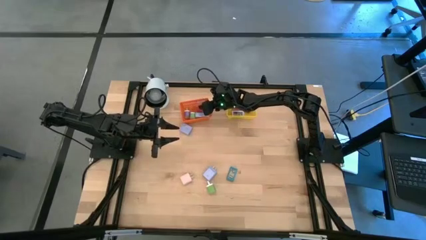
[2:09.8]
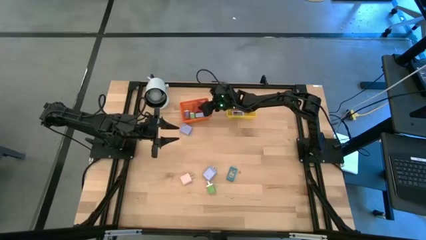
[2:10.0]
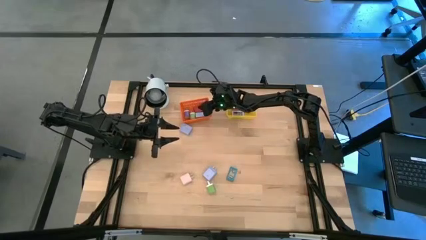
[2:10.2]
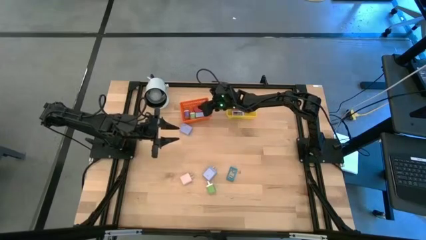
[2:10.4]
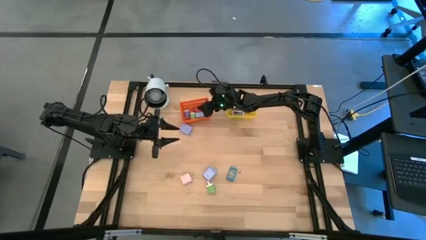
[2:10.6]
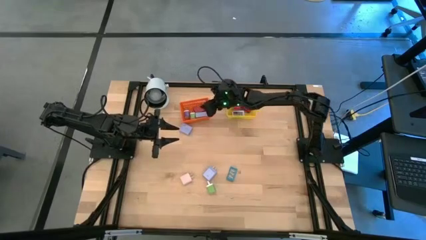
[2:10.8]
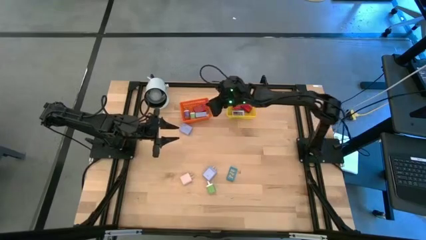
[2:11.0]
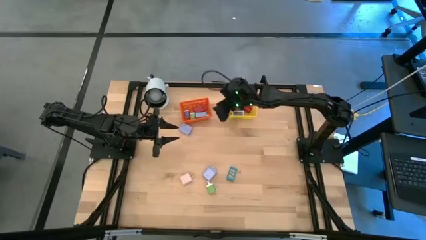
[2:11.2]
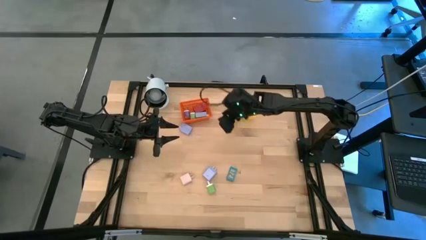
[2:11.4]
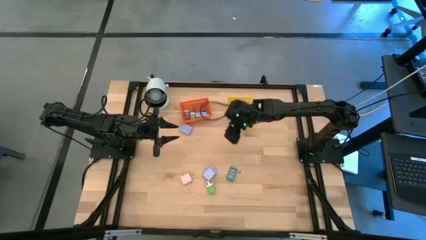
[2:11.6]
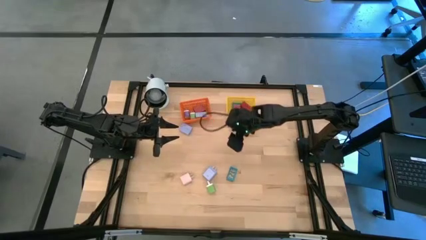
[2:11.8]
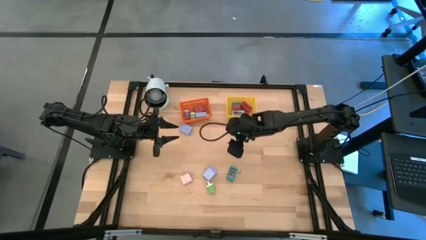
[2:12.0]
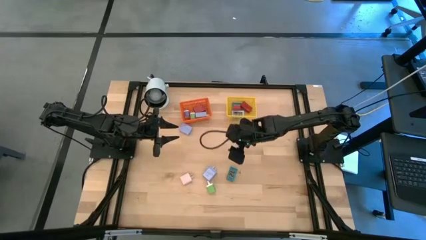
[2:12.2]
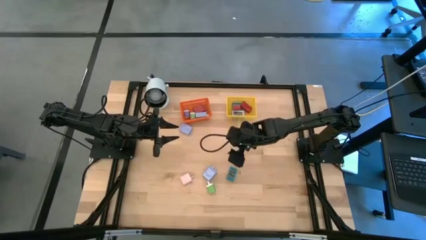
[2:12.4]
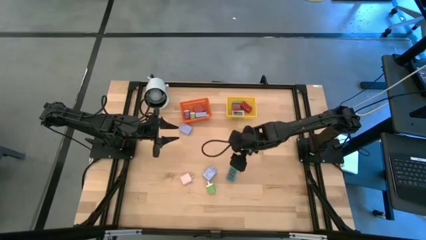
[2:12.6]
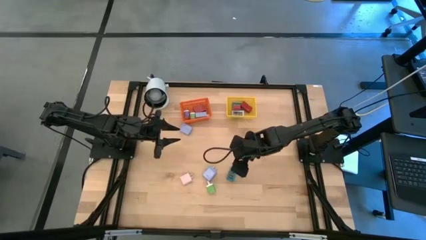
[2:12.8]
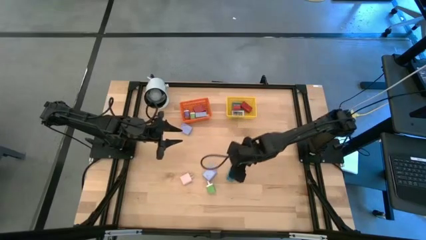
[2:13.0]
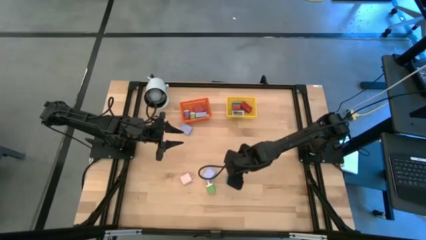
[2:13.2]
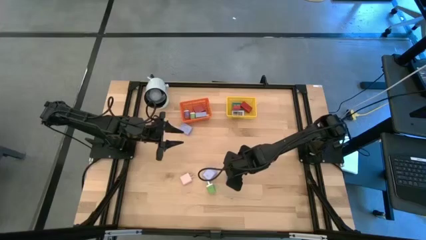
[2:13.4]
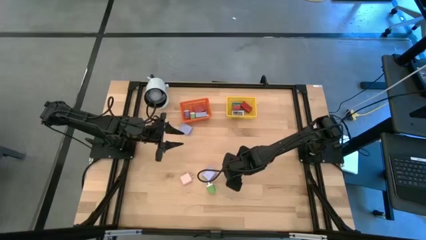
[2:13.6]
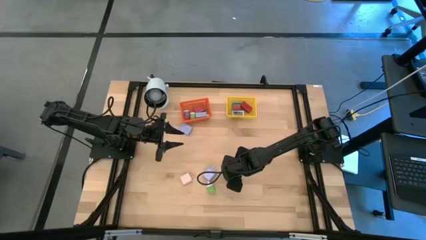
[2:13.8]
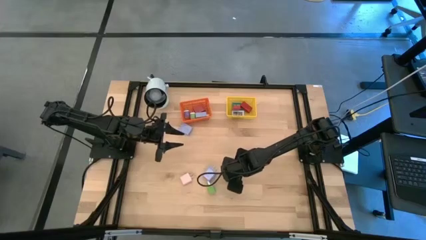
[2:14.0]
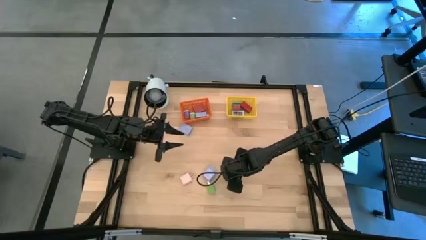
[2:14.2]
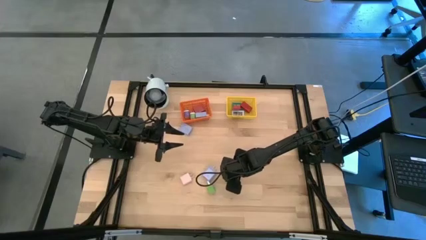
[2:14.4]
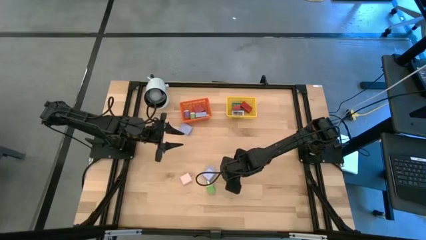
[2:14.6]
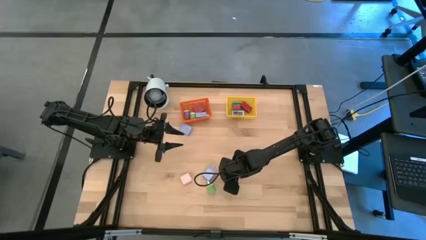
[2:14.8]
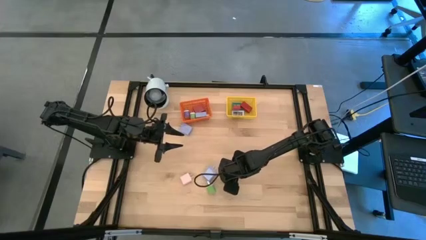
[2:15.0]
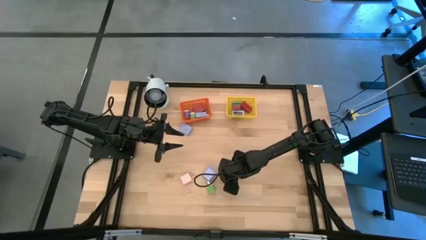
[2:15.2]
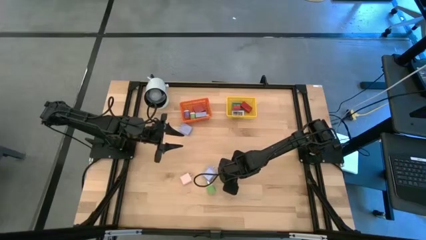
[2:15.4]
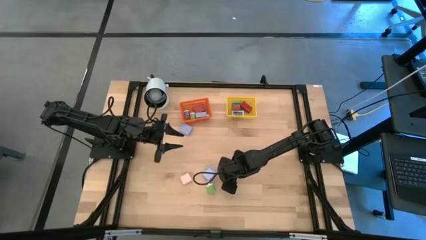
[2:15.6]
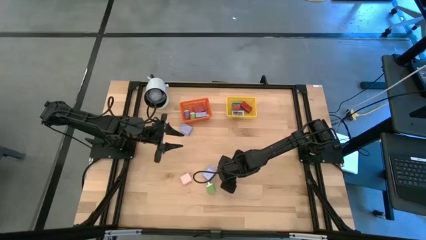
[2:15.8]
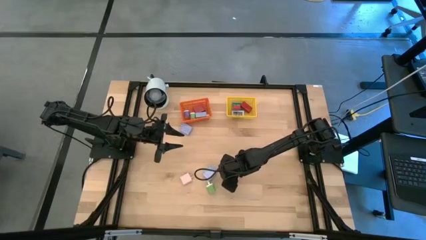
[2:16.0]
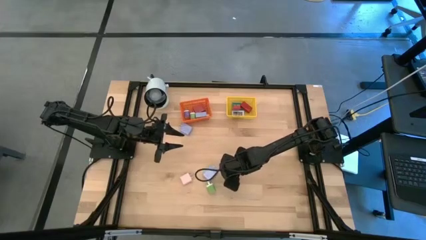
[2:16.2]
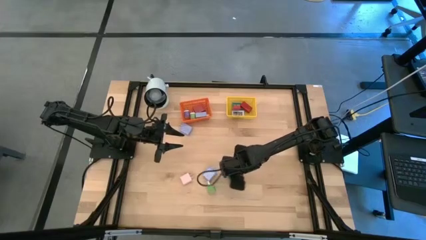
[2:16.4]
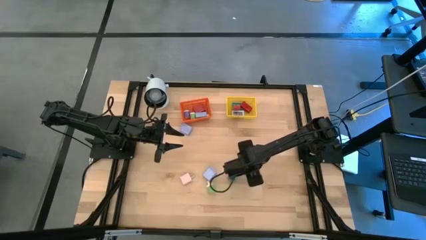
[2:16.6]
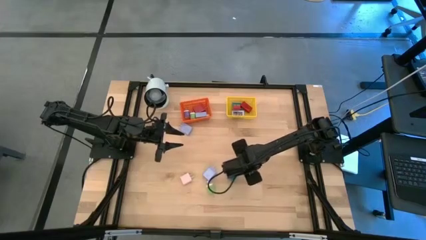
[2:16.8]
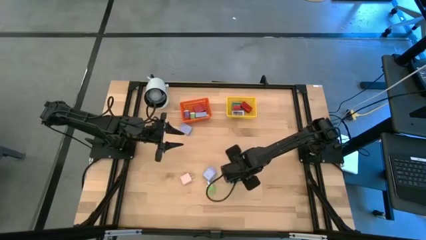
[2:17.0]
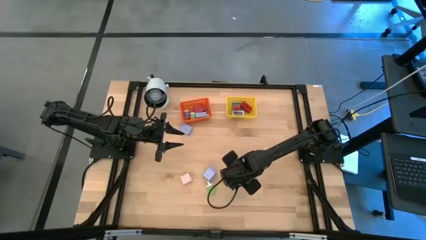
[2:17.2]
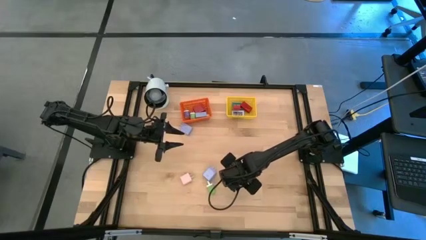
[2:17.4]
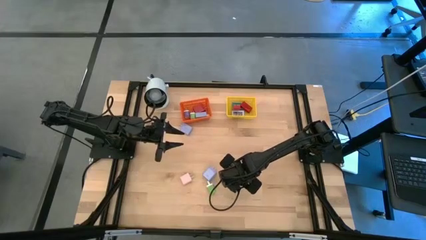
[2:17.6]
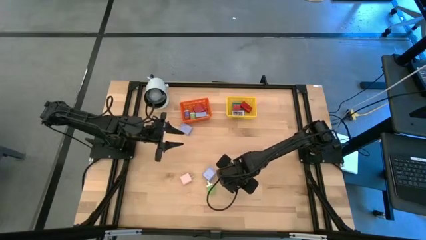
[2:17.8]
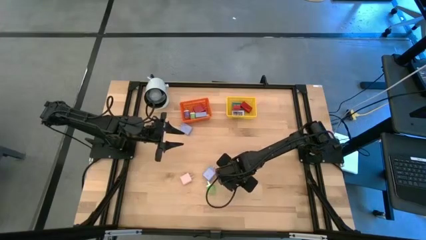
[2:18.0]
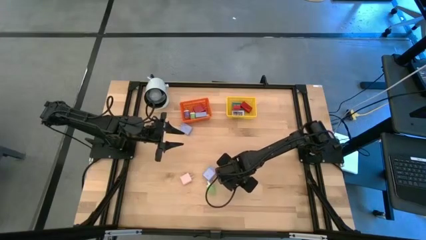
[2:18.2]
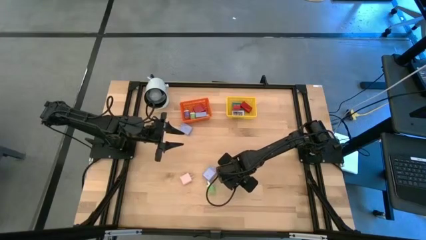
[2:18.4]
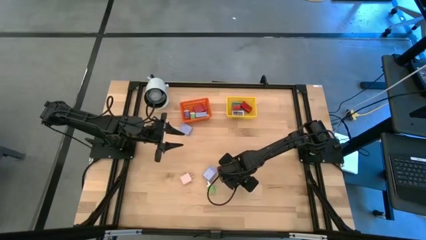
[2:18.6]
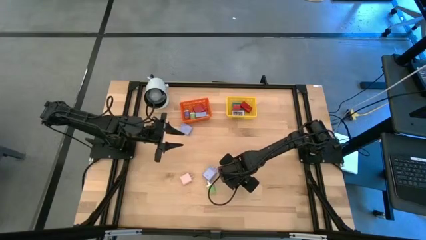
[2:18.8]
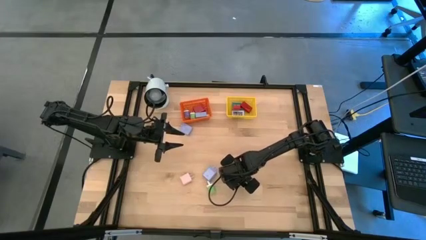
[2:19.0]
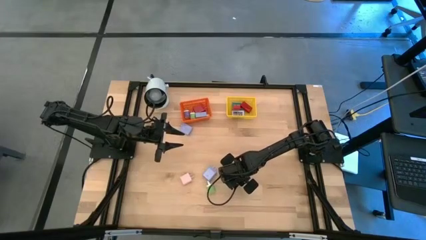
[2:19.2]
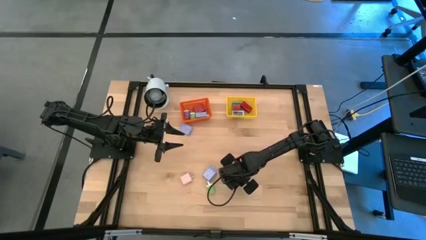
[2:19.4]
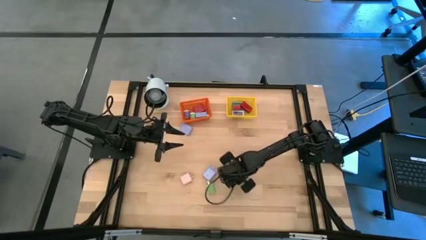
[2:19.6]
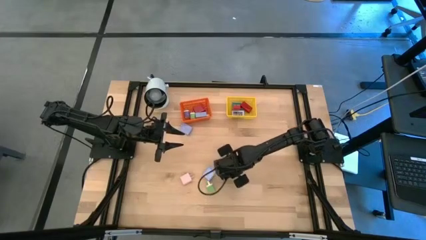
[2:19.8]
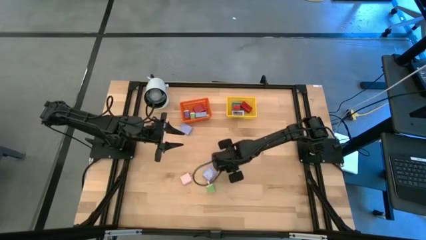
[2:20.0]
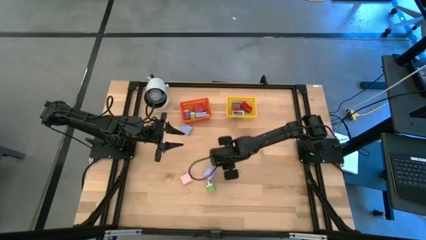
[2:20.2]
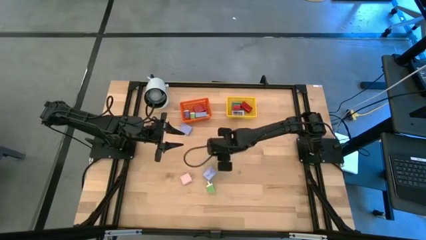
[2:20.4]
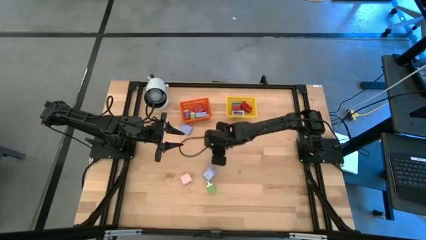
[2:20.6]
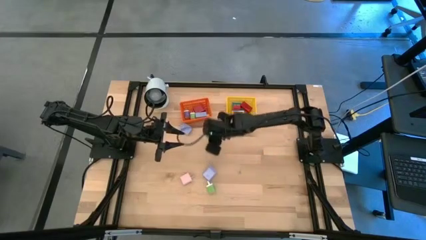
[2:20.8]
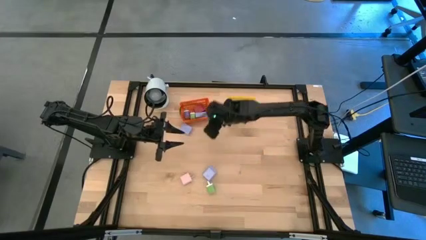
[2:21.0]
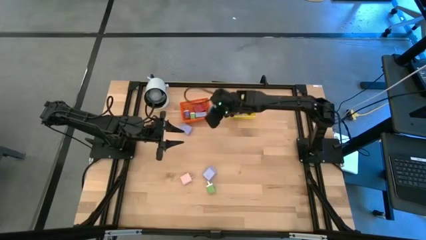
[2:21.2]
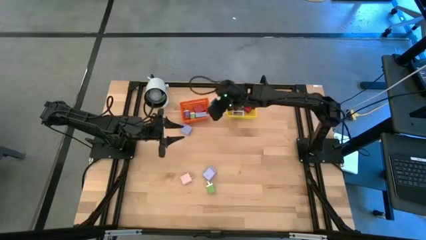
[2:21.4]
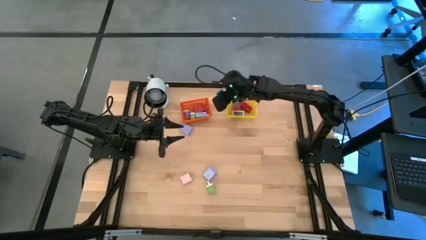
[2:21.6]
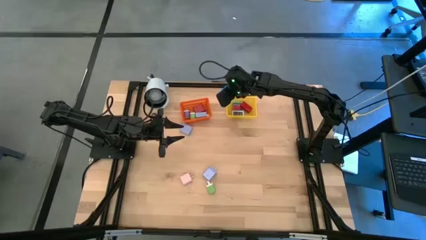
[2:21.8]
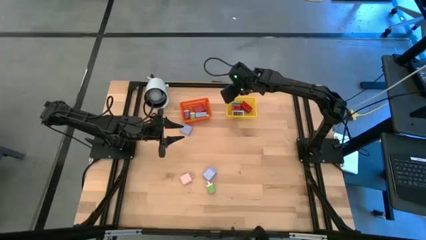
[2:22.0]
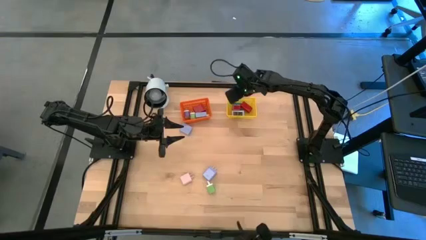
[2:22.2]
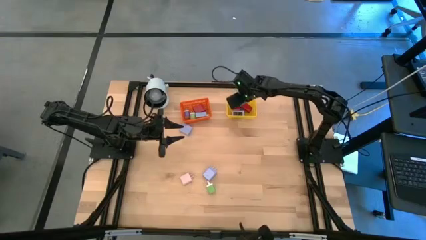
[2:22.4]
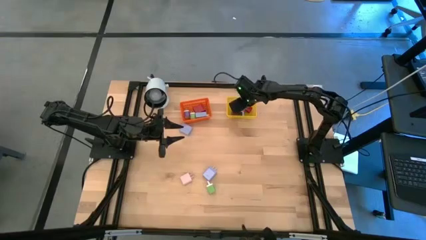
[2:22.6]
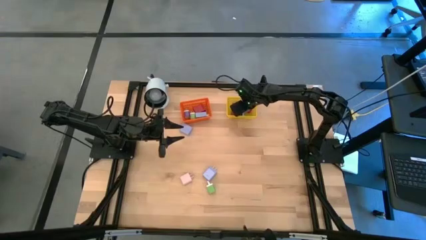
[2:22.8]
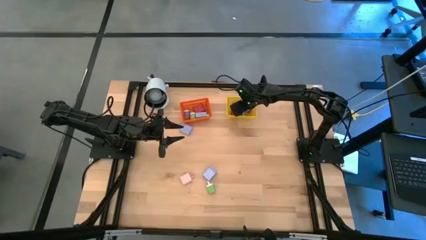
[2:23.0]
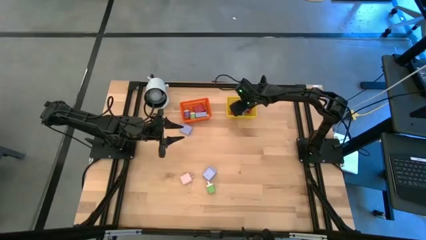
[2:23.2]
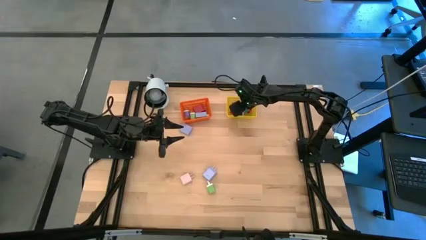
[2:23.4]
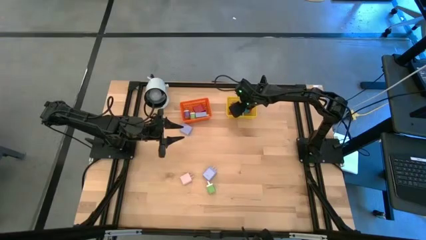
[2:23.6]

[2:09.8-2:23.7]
Task: Pick & Place Office items
Put the blue digital clock into the yellow bin

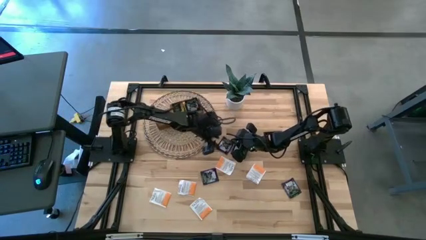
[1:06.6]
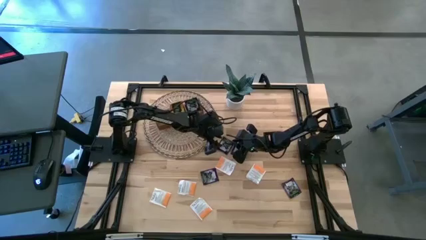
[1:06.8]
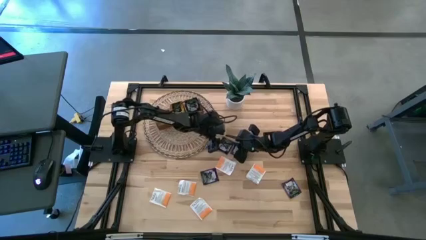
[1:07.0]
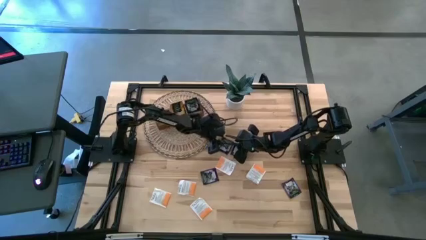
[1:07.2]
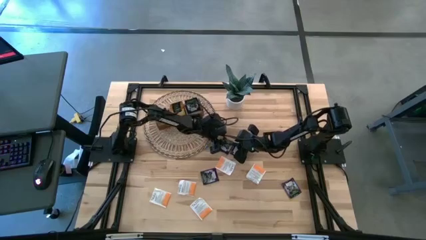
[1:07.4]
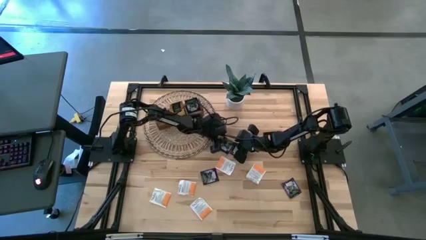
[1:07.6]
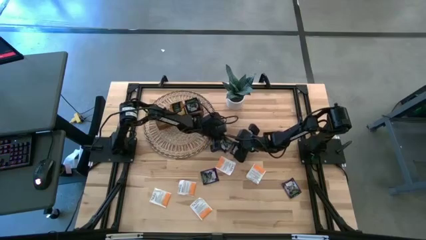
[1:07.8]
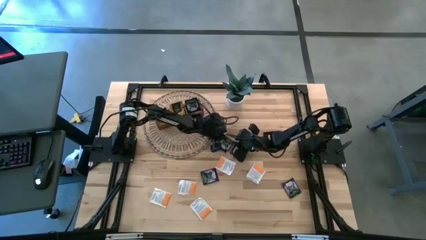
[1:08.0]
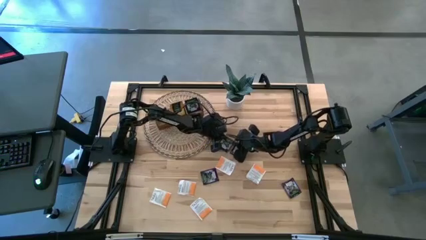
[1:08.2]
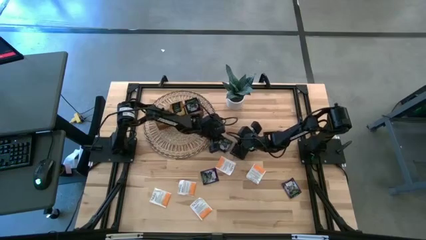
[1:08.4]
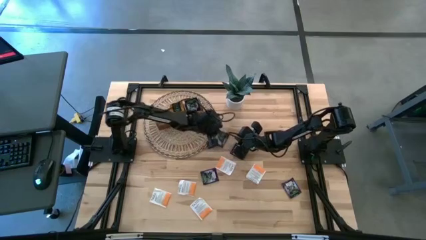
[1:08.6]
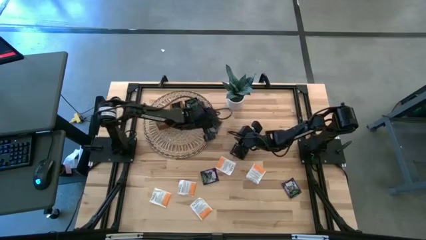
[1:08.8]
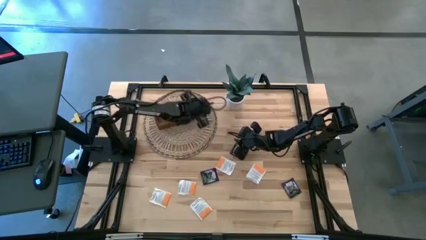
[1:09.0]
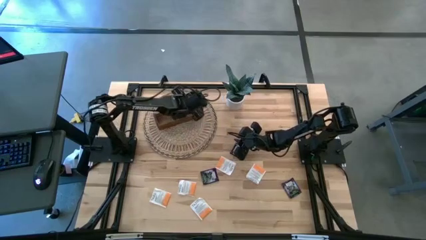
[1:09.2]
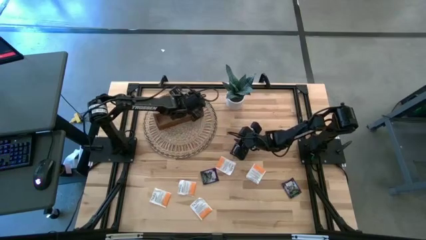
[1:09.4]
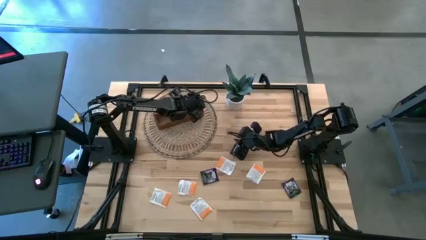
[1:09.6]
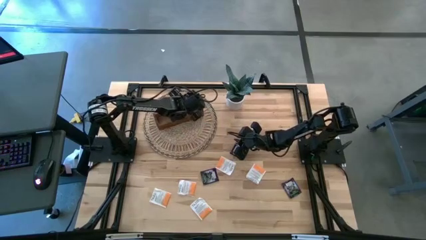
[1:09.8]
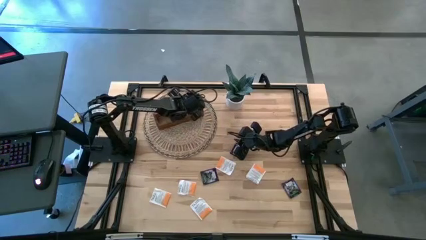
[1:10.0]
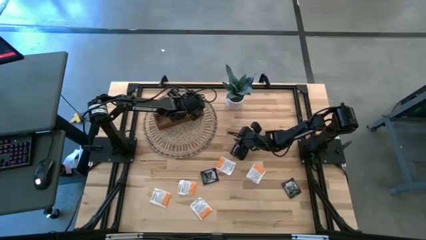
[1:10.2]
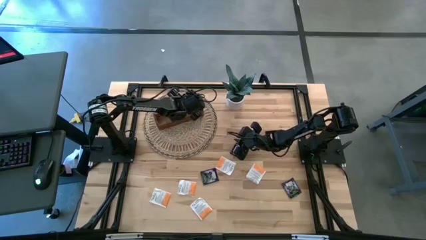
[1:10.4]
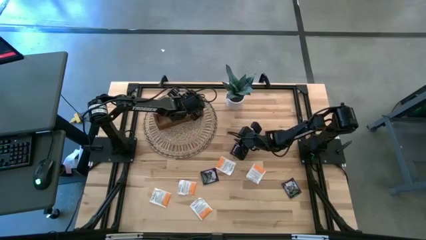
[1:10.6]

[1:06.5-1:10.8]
Task: Pick & Place Tea
Put the black tea bag into the right section of the wooden organizer
